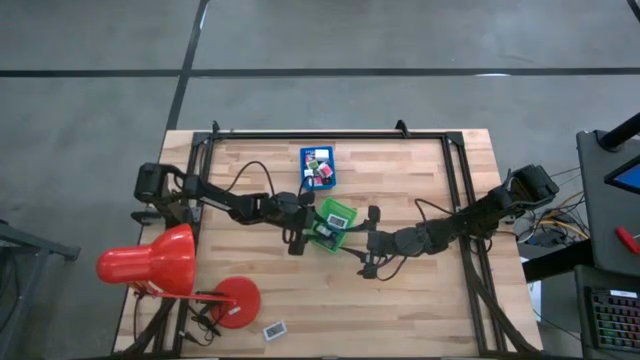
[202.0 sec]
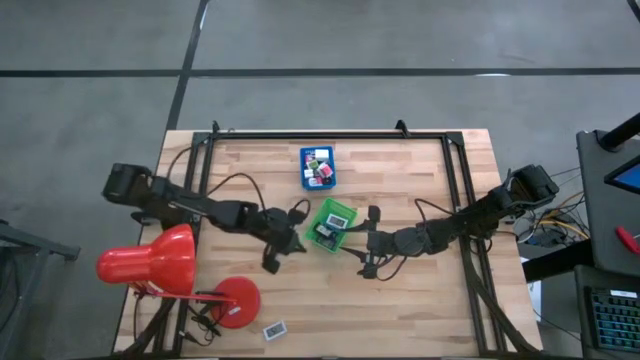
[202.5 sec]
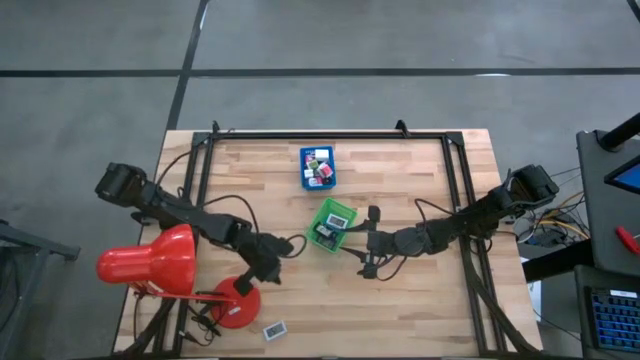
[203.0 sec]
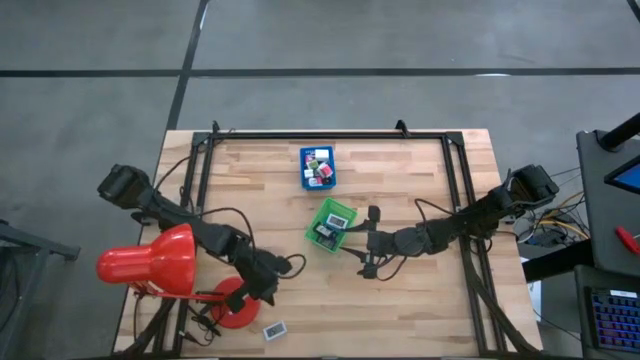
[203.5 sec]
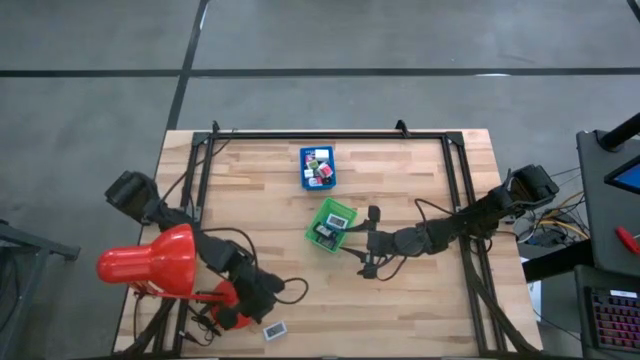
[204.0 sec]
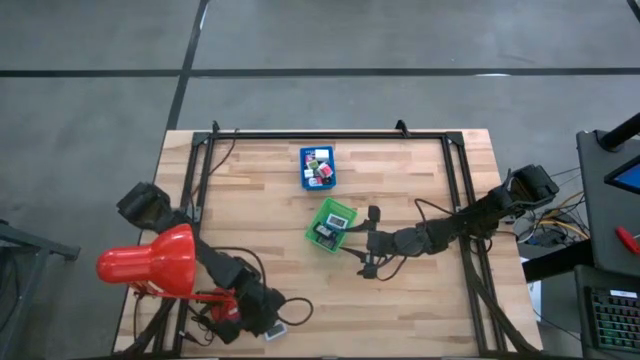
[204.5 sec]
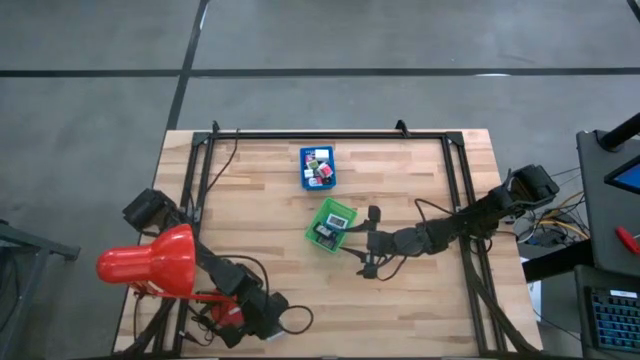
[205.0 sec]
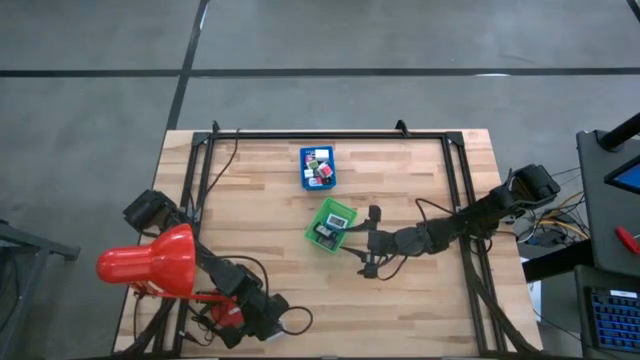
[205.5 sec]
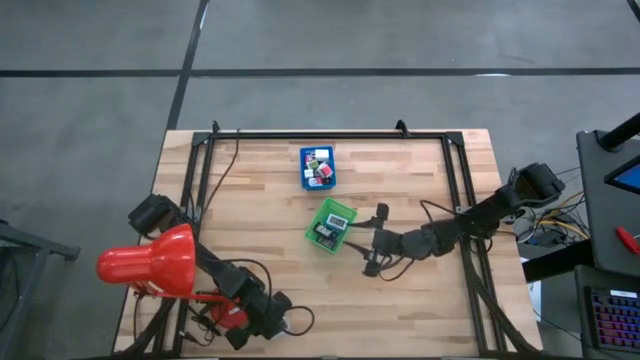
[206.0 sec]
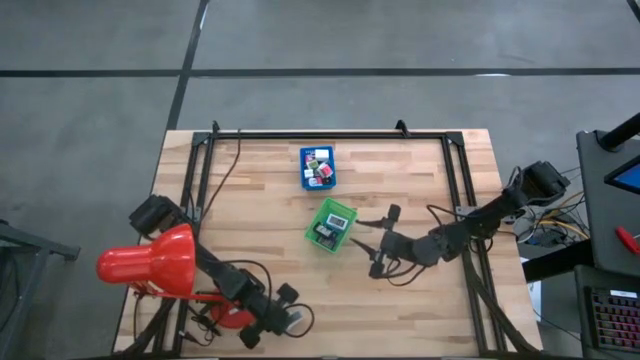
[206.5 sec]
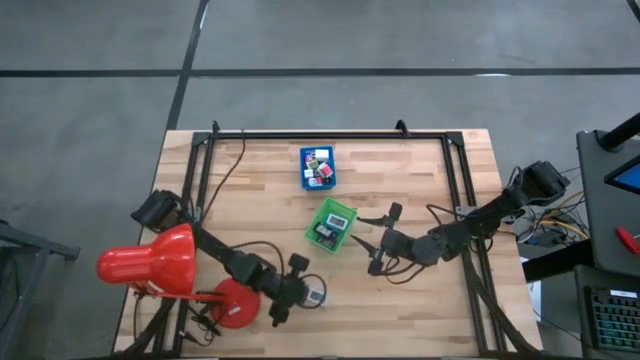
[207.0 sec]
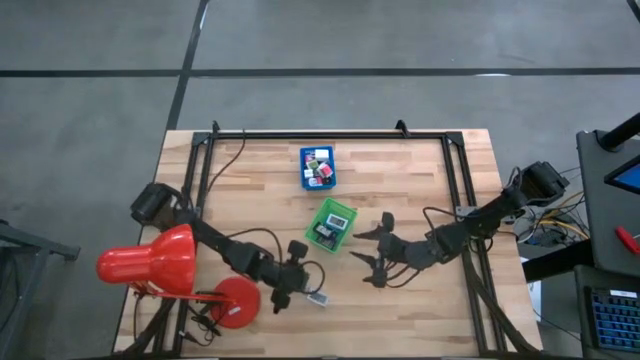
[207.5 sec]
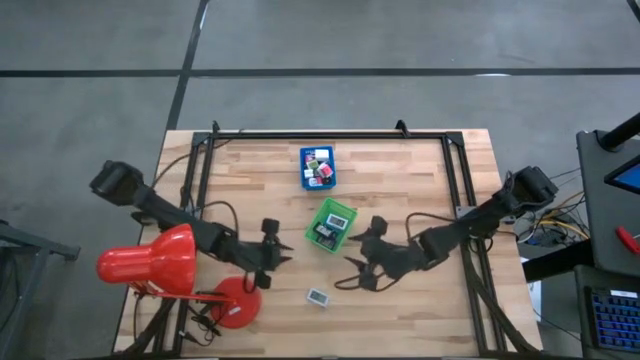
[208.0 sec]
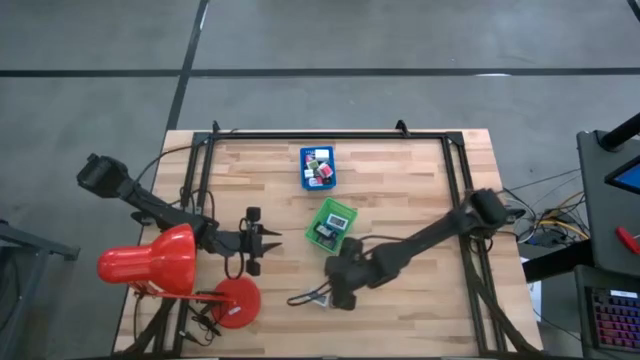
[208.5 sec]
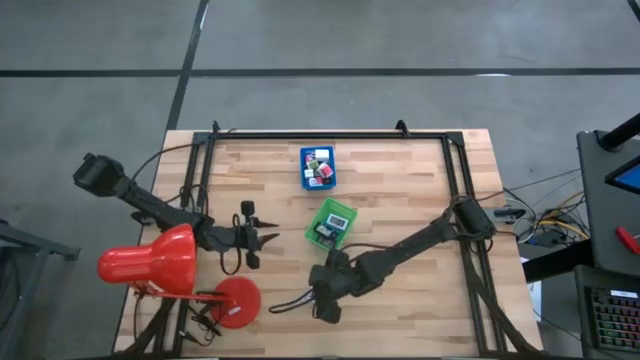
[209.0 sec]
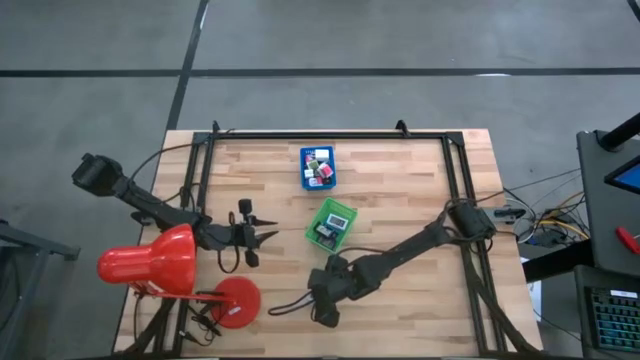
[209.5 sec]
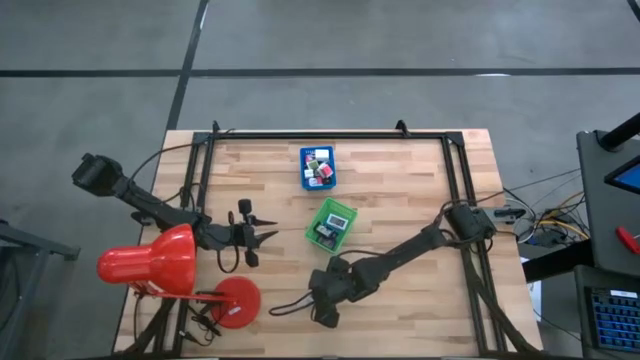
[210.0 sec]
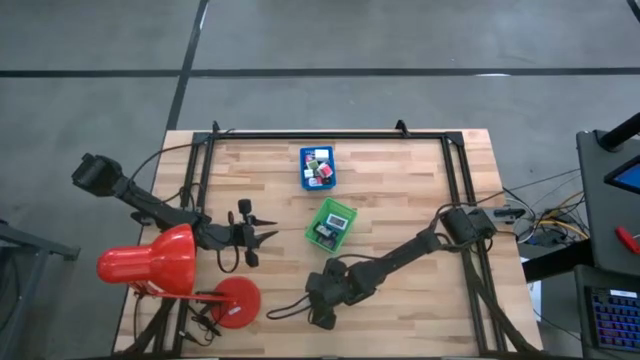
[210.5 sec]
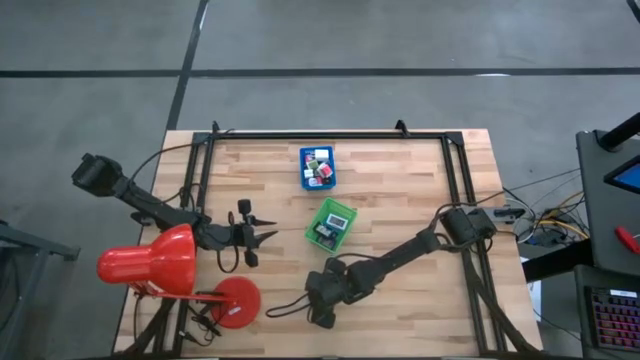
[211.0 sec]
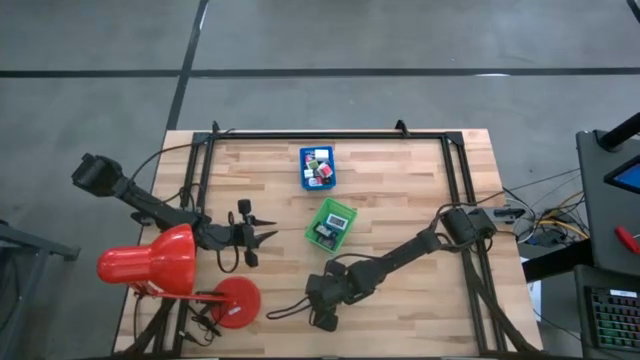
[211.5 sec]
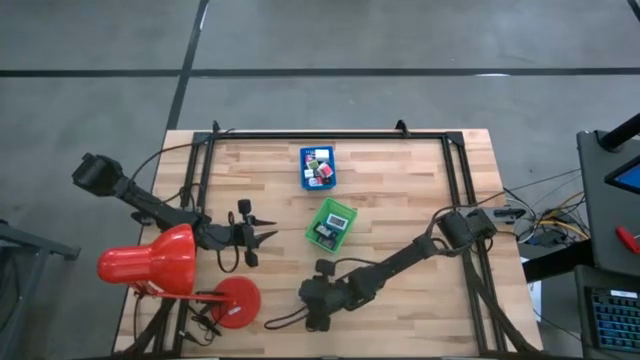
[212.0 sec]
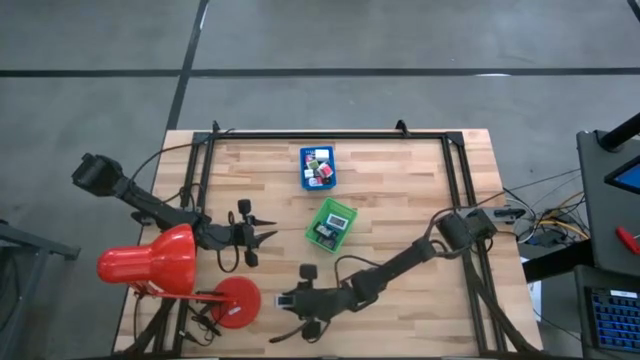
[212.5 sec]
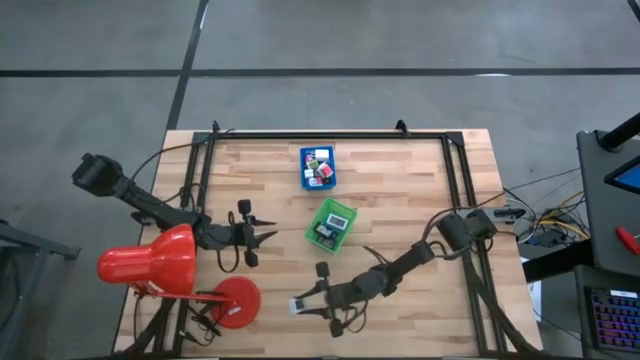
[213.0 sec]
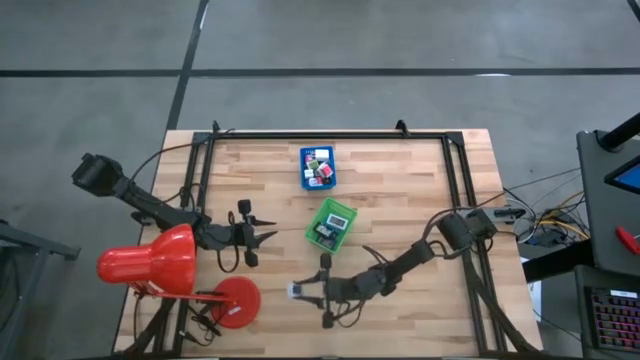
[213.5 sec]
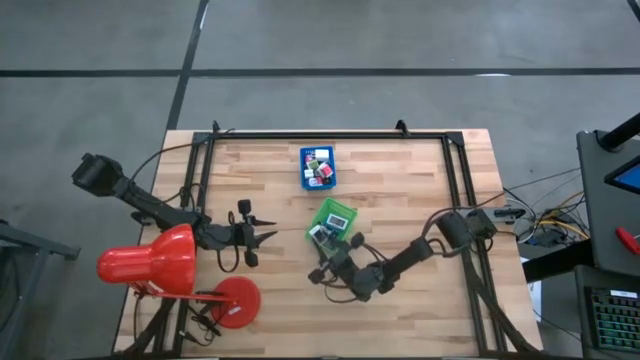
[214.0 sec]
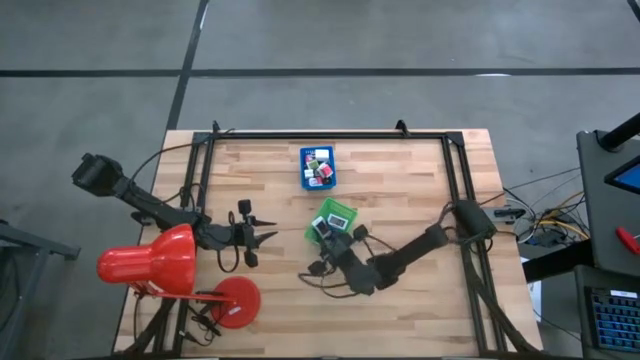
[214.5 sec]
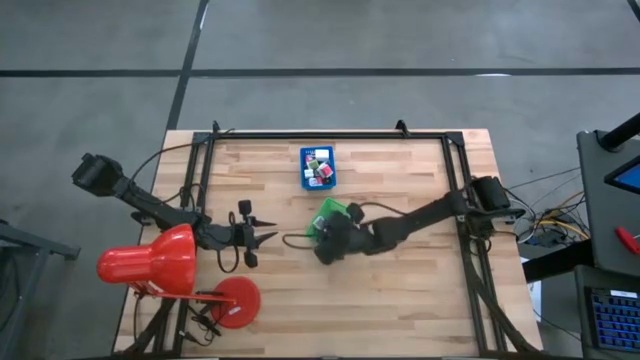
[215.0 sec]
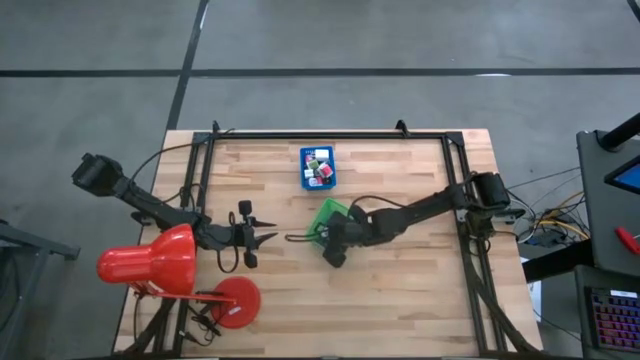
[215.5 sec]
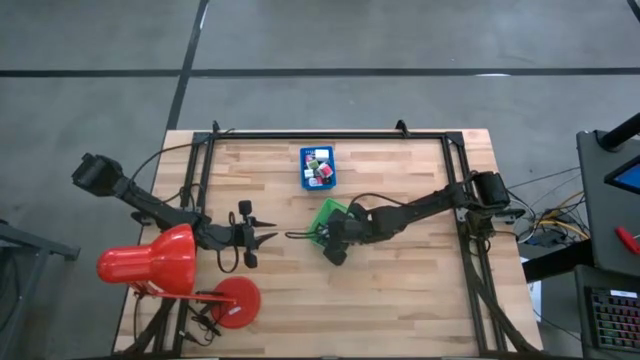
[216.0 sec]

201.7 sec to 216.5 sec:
Task: Pick & Place Office items
Put the white digital clock into the green bin

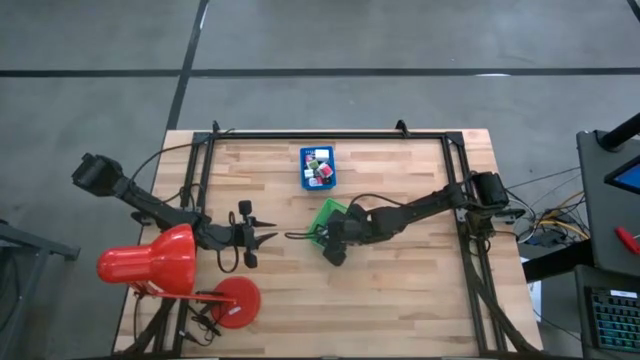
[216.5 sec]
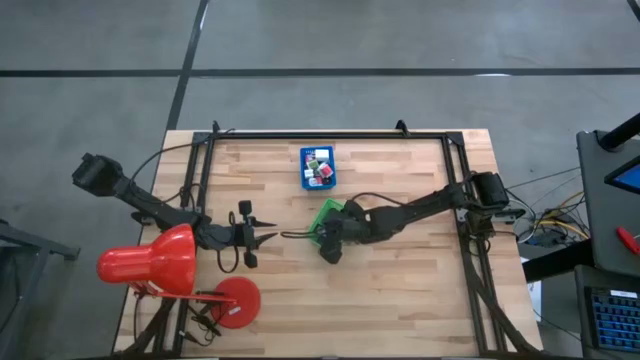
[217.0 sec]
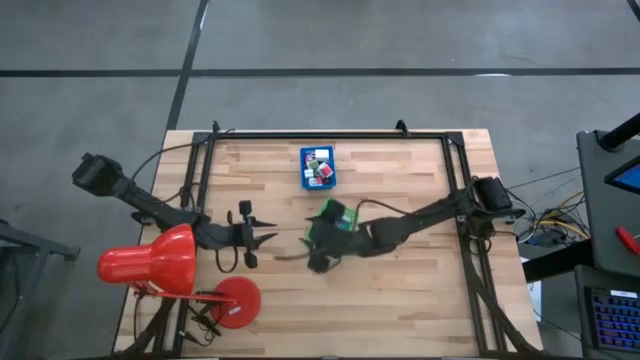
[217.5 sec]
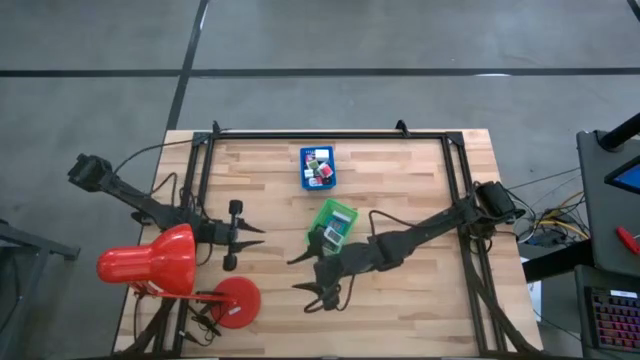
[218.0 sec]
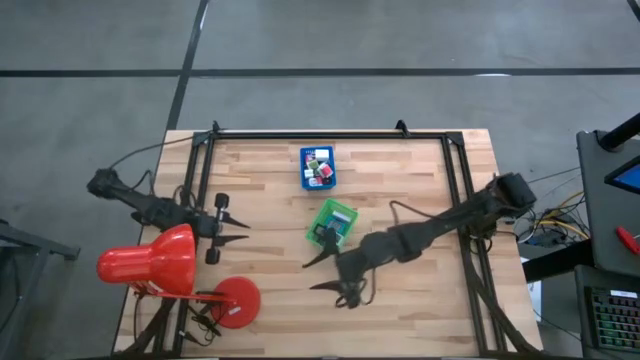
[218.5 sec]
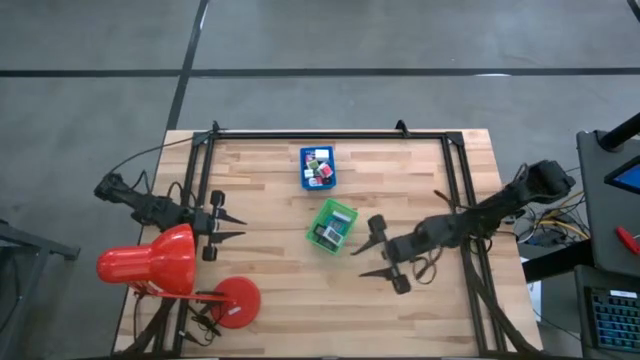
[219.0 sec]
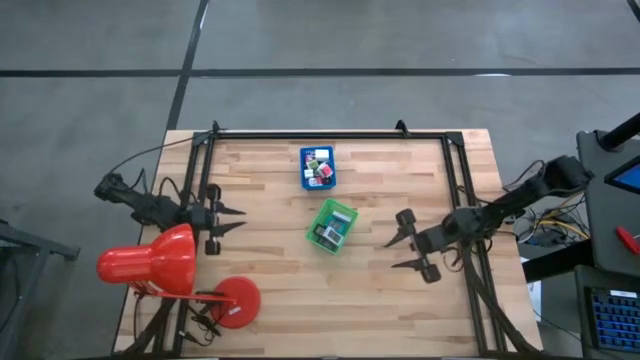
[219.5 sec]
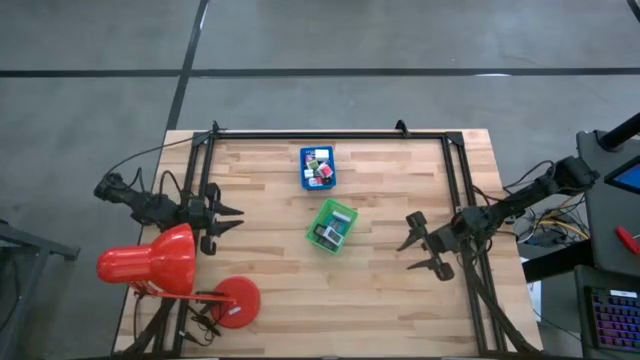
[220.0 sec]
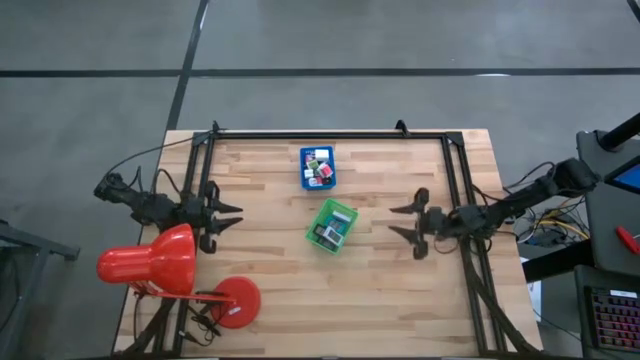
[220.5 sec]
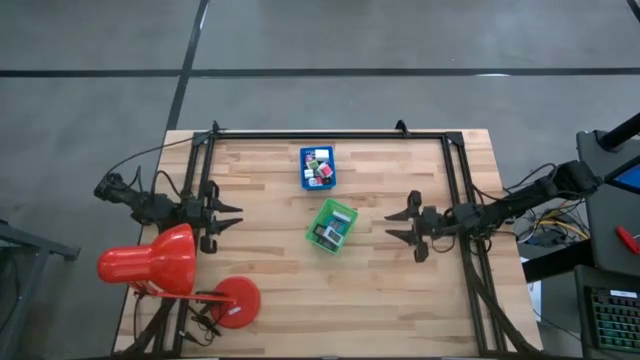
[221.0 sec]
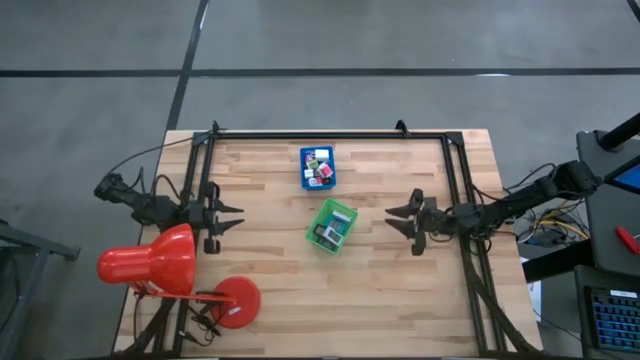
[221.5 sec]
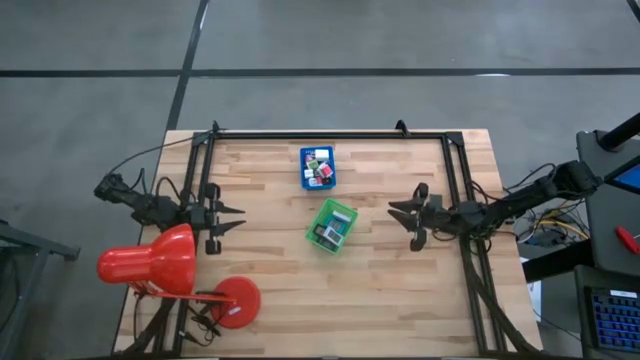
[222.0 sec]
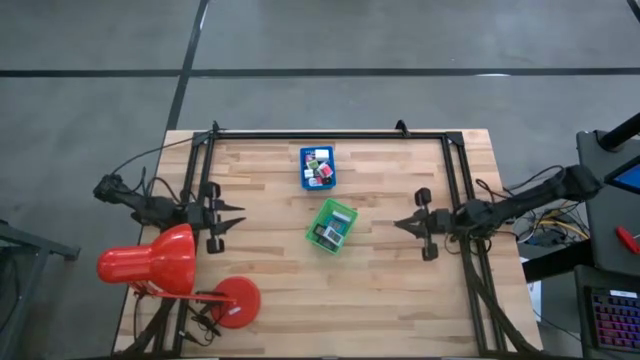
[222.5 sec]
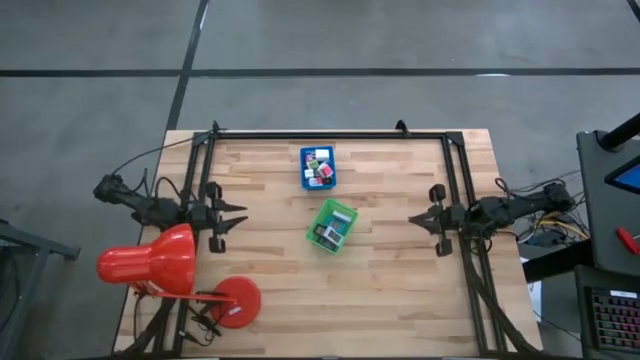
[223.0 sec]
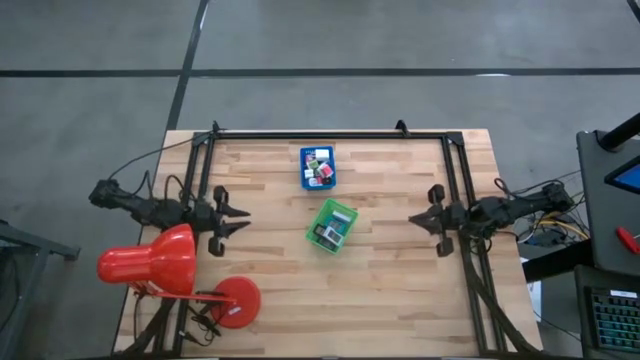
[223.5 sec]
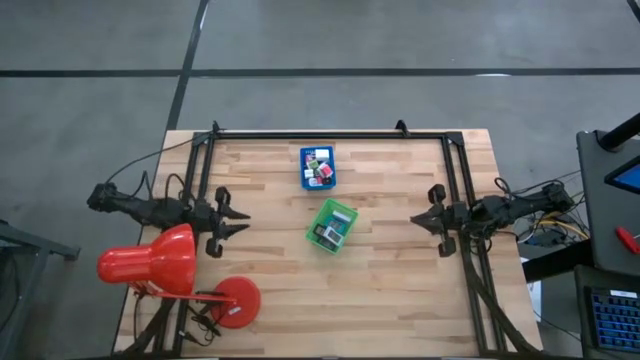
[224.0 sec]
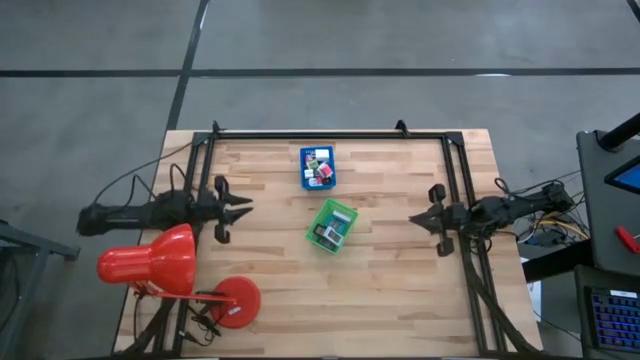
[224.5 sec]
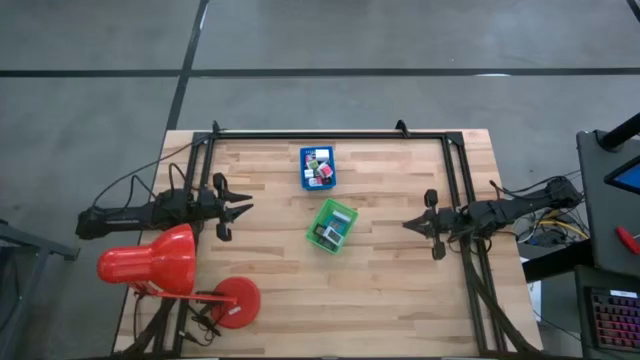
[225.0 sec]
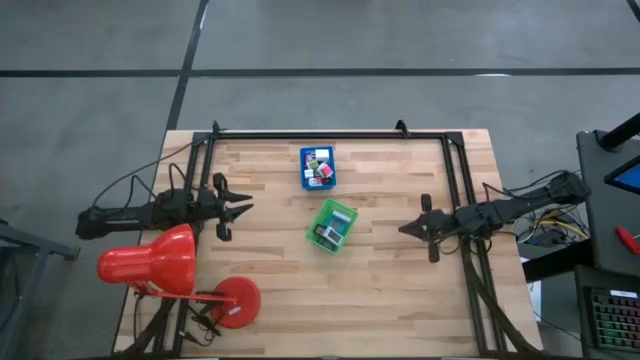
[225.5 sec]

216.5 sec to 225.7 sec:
Return to Home Position
